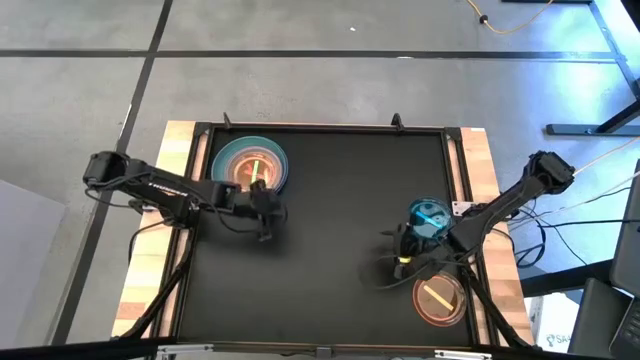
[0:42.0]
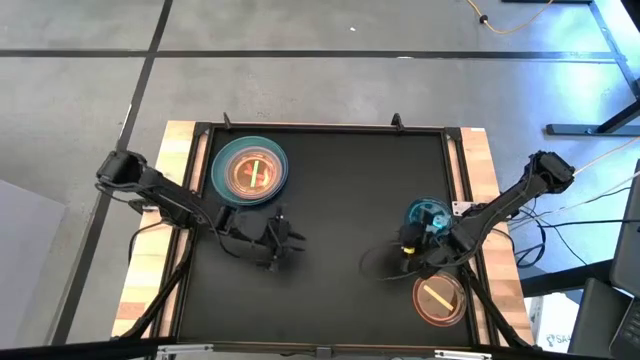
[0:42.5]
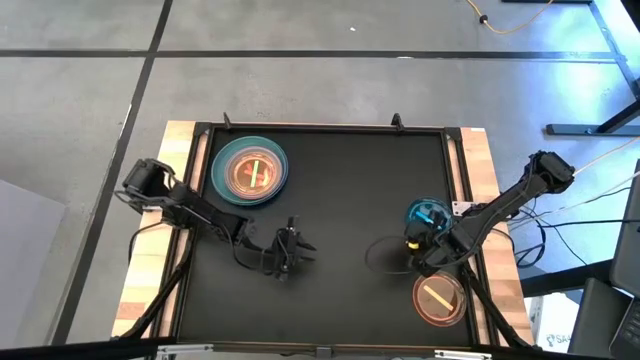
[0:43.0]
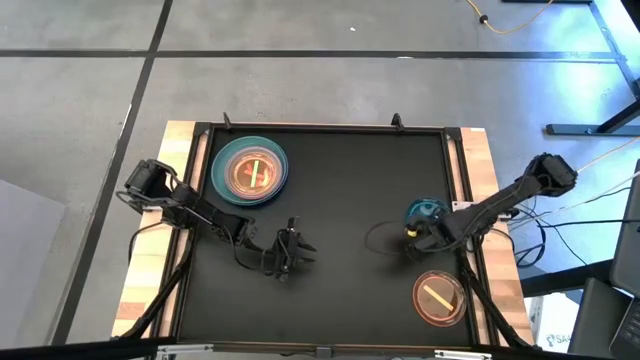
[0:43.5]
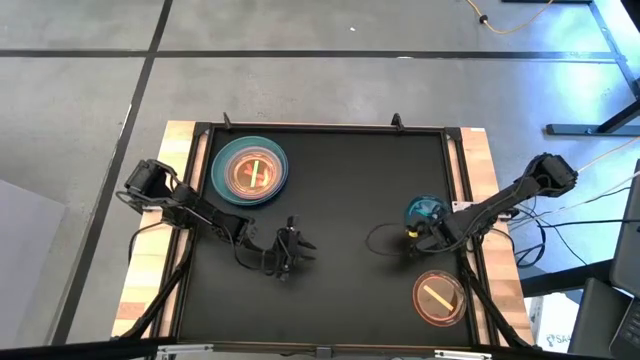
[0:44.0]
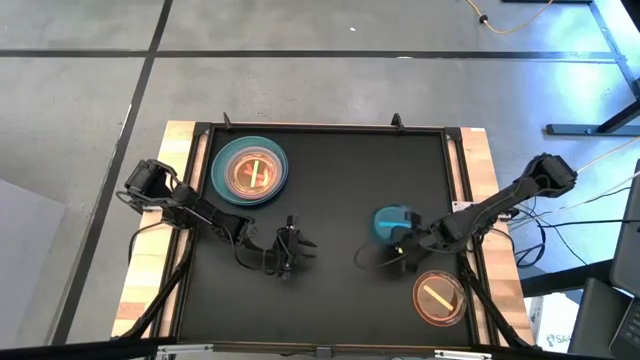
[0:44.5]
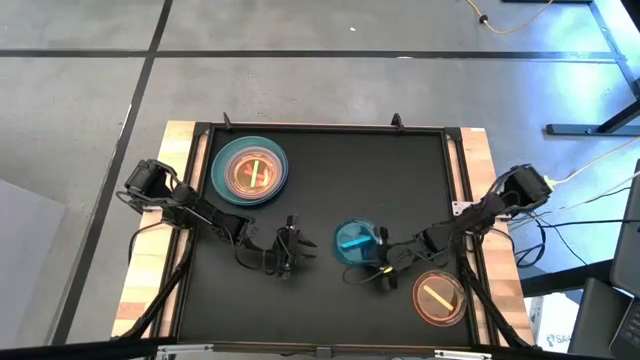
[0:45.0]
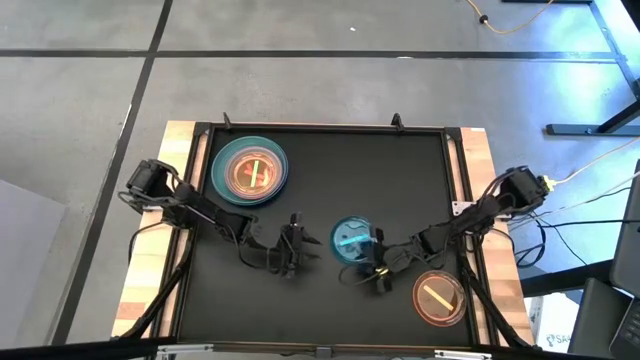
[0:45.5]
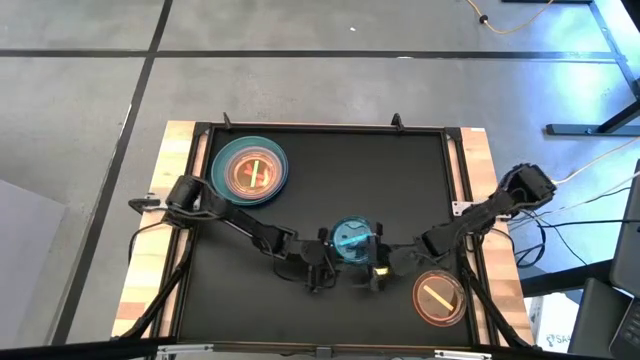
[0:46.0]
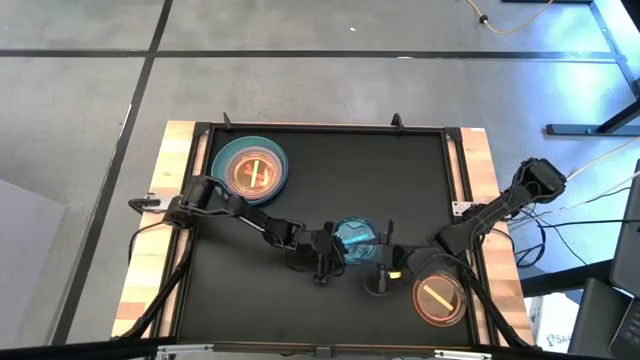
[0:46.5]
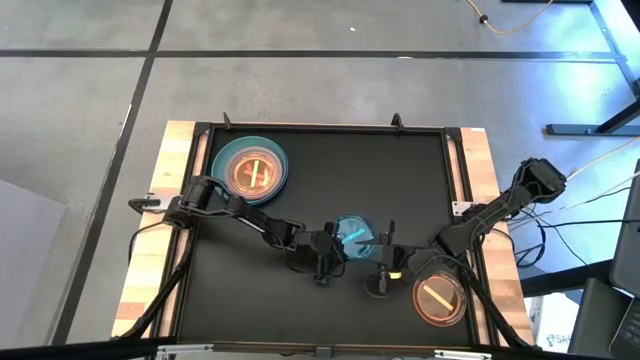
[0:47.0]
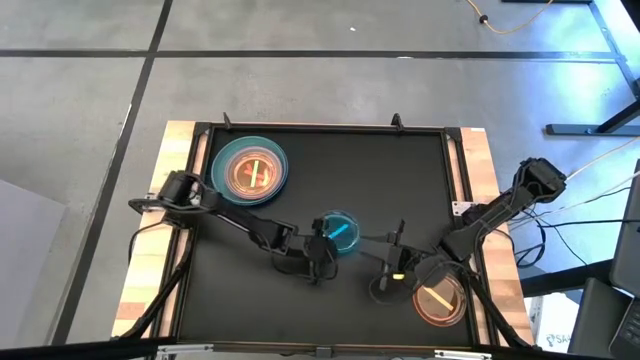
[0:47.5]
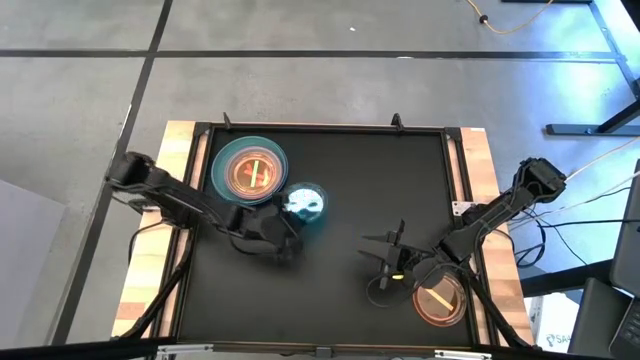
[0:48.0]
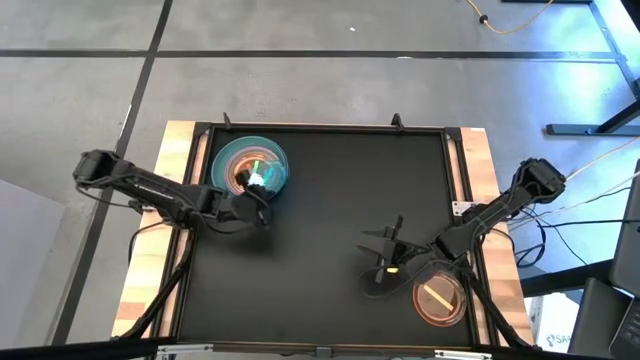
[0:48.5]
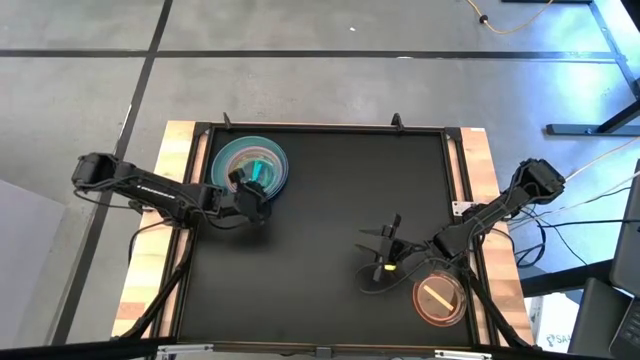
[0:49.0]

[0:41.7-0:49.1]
Task: Stack plastic plates
Stack the transparent blue plate on top of the transparent green plate on the table

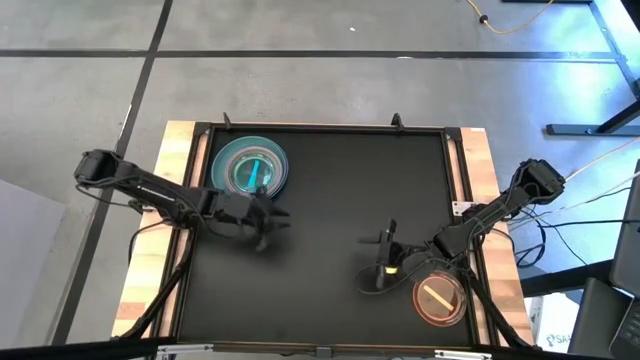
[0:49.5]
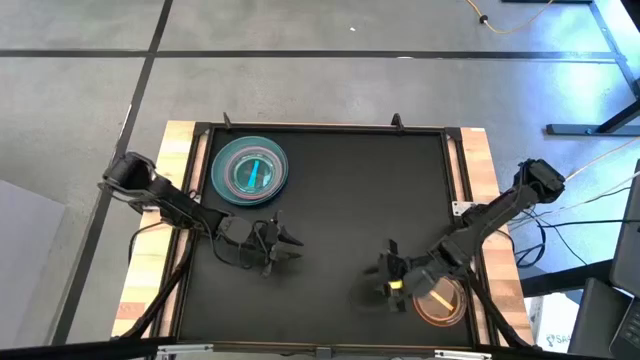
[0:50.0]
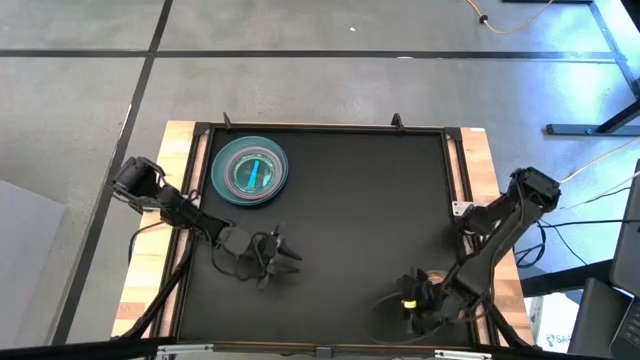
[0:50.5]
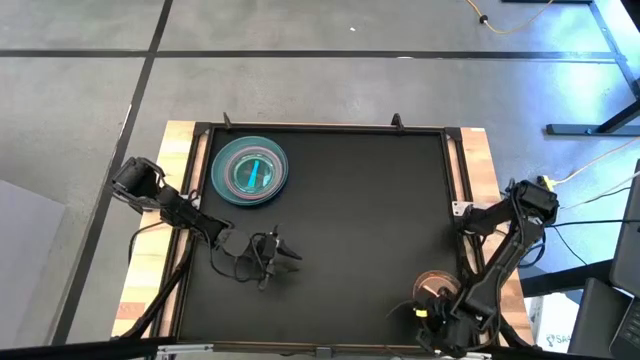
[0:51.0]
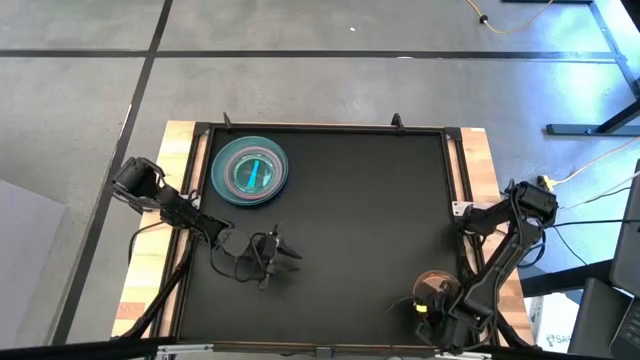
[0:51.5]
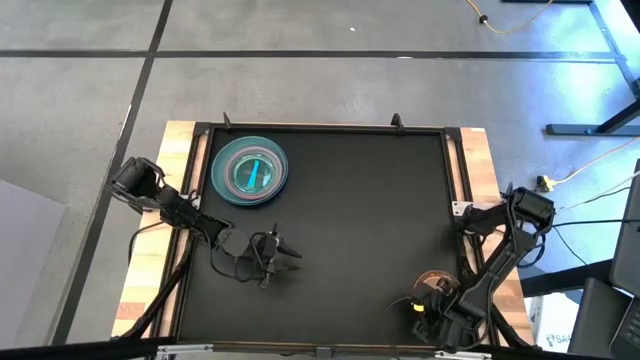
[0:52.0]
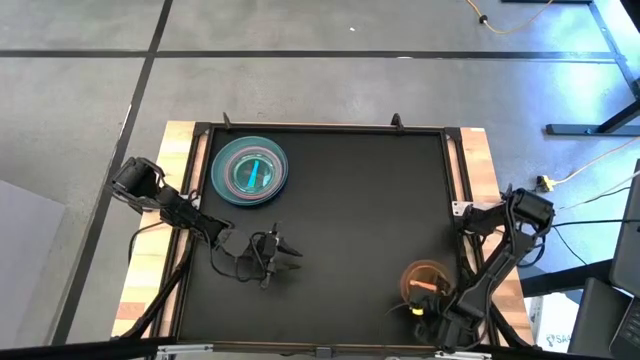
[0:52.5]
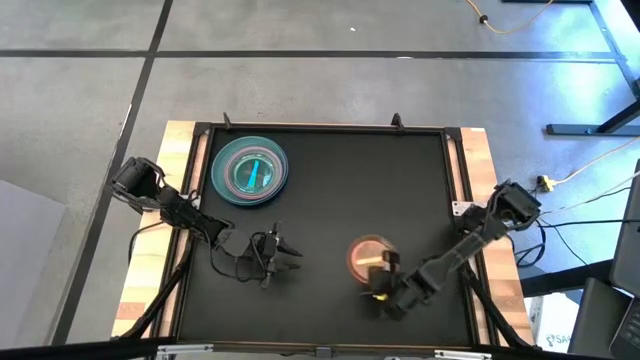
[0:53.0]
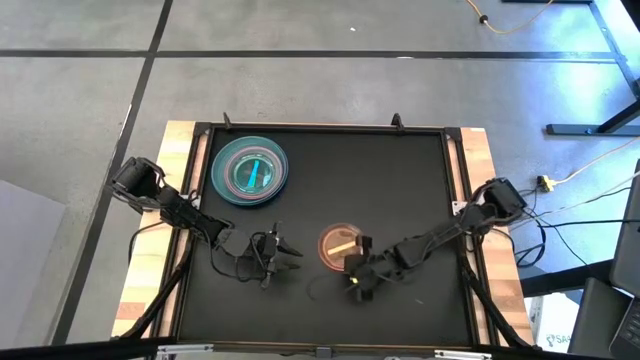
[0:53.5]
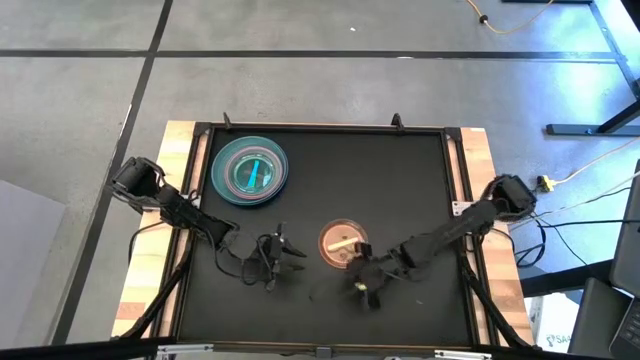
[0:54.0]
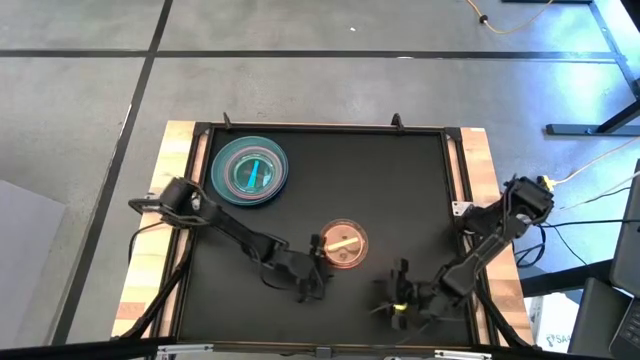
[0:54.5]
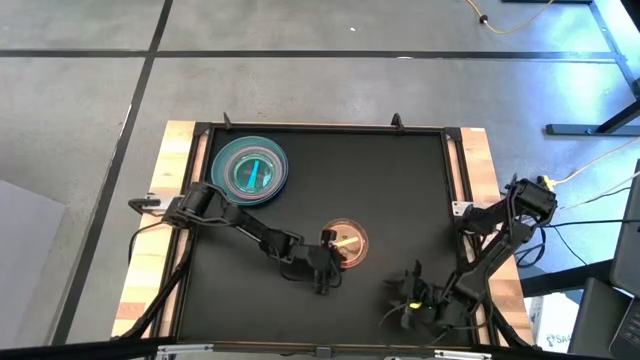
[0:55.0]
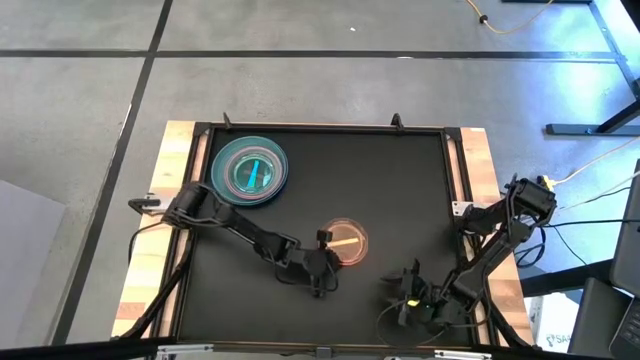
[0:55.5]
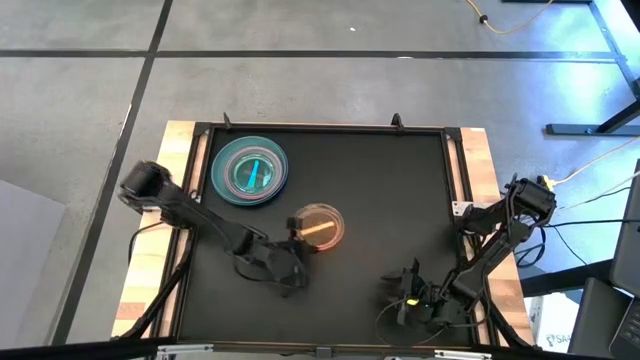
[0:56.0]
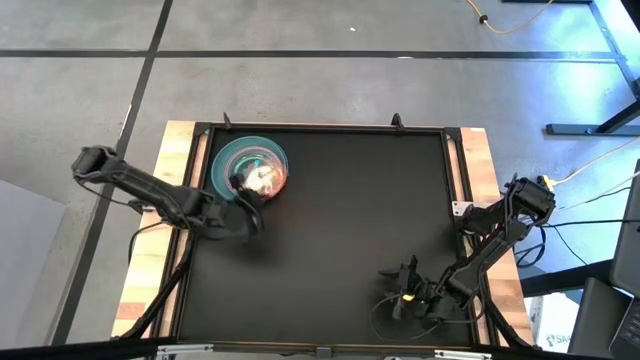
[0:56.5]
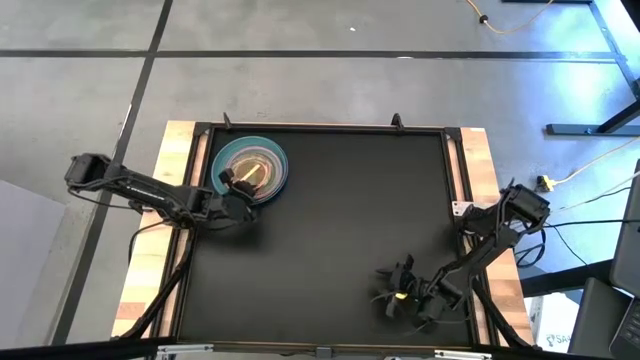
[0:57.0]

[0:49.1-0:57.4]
Stack the transparent orange plate on top of the transparent blue plate on the table

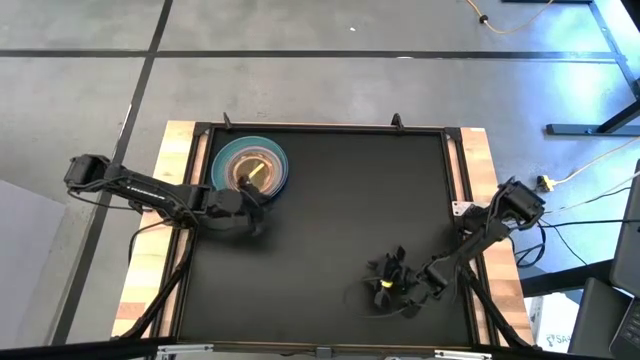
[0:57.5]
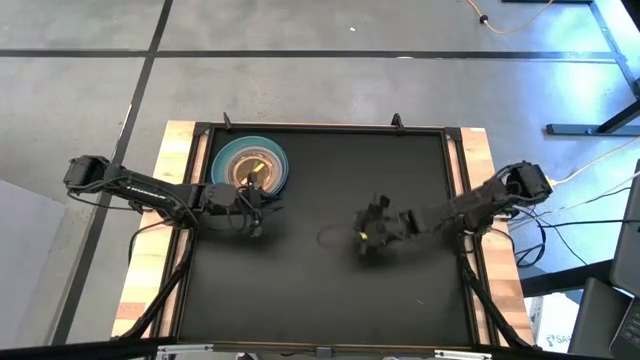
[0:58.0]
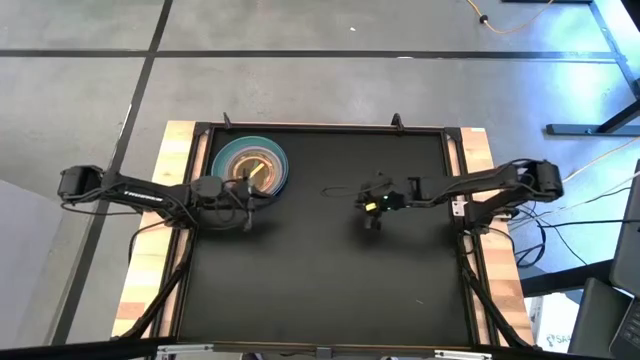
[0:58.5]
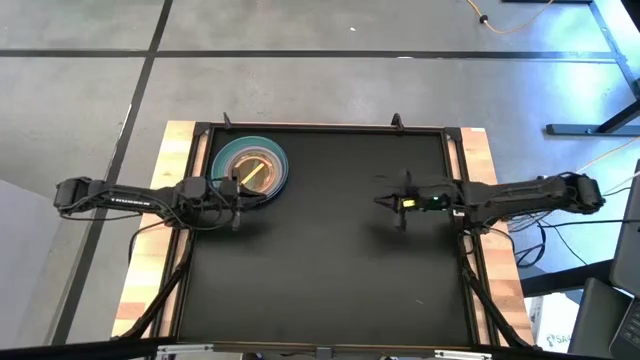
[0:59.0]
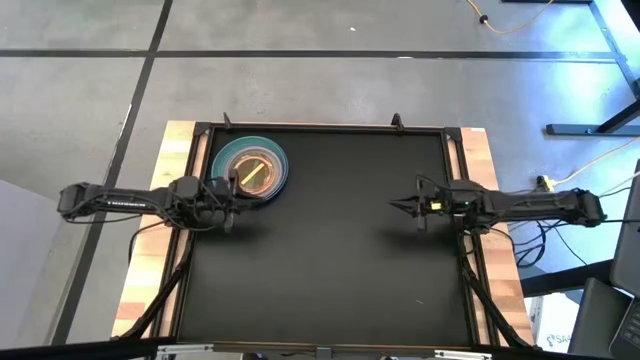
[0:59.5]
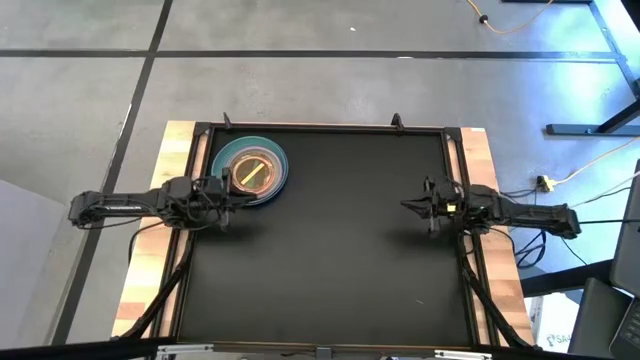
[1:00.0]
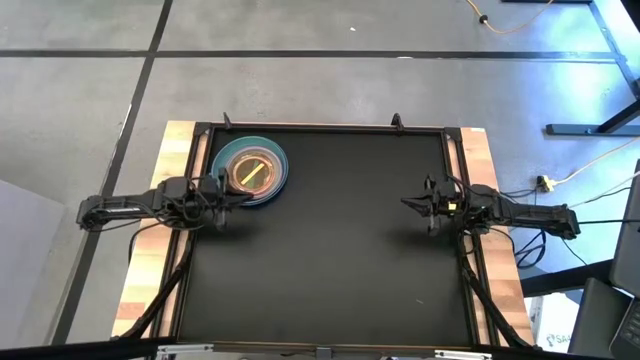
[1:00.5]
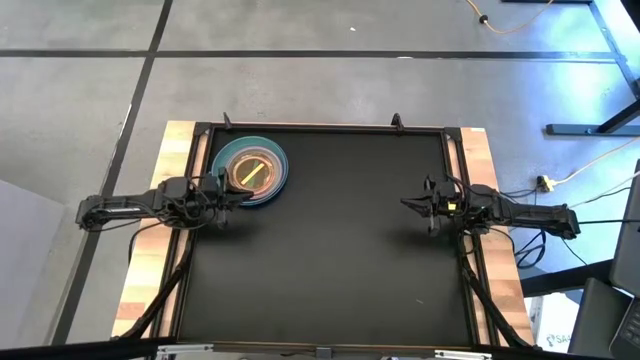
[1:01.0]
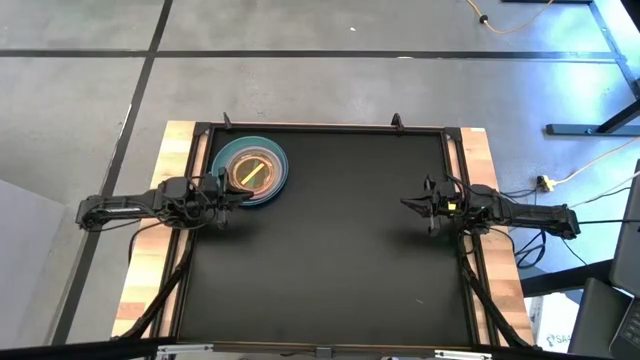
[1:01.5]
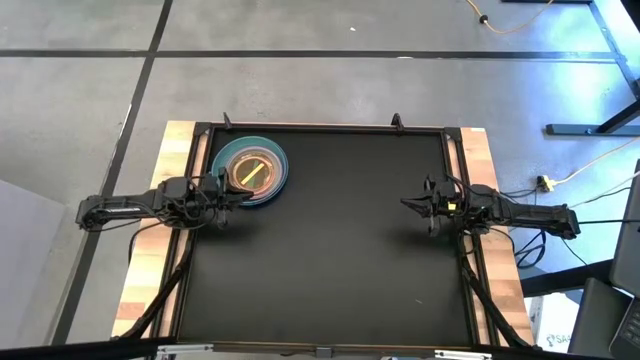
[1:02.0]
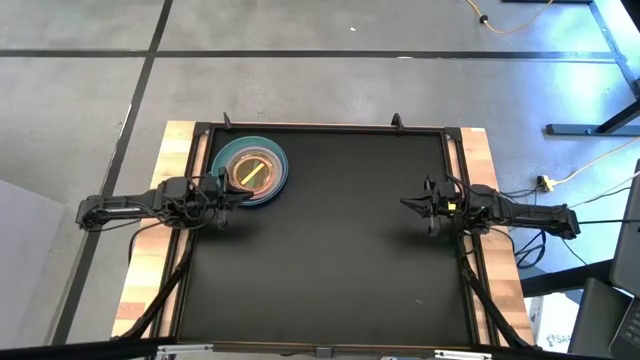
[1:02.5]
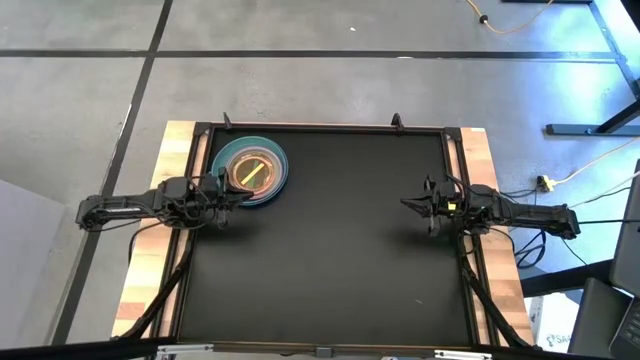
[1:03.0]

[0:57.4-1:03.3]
Return to Home Position

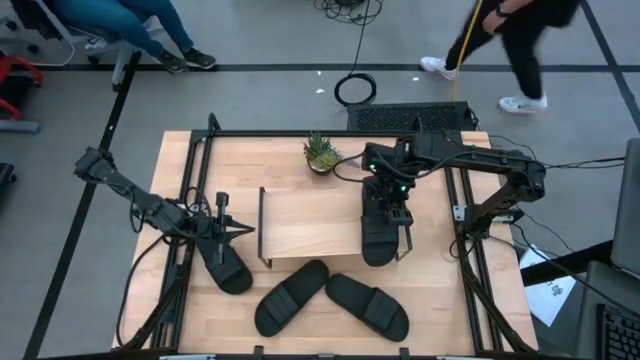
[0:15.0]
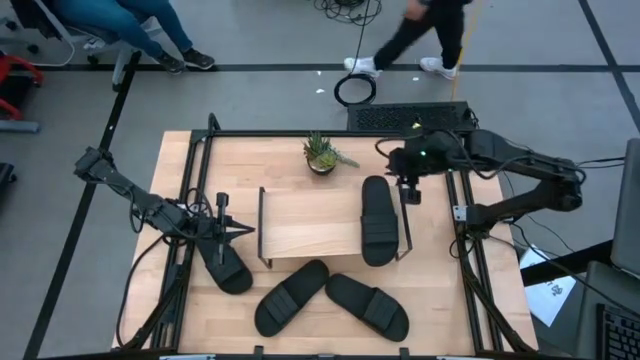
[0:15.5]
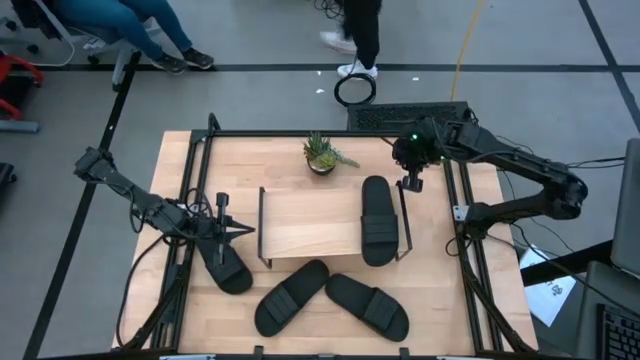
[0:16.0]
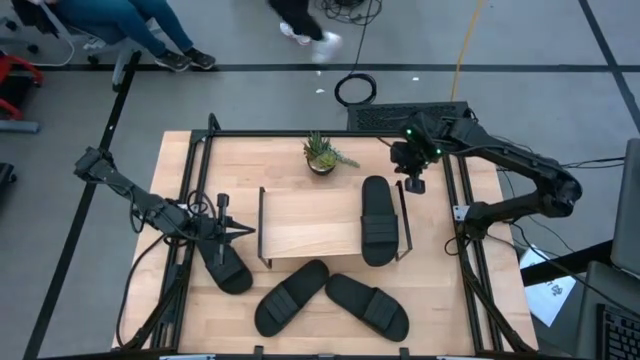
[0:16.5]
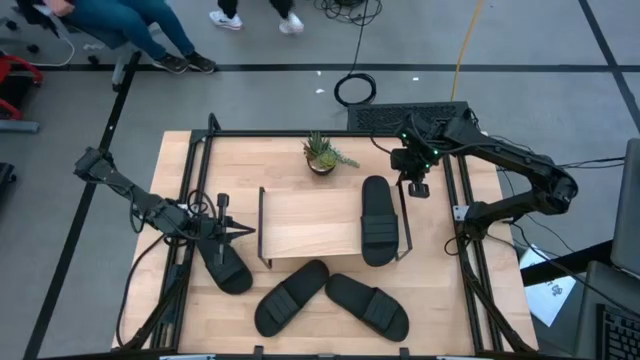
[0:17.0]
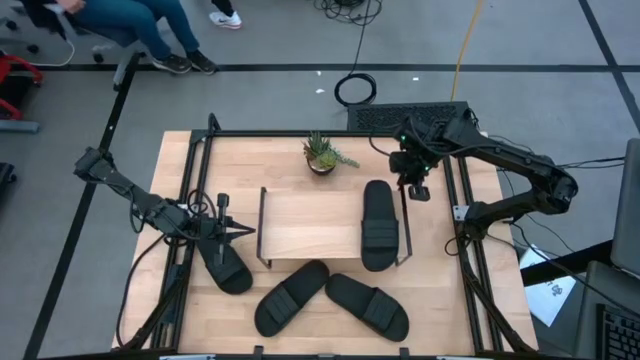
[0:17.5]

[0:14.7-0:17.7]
Task: Pick and place slides into the shelf
Adjust the shelf
